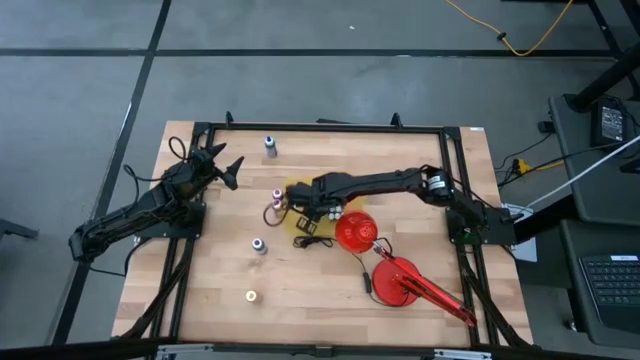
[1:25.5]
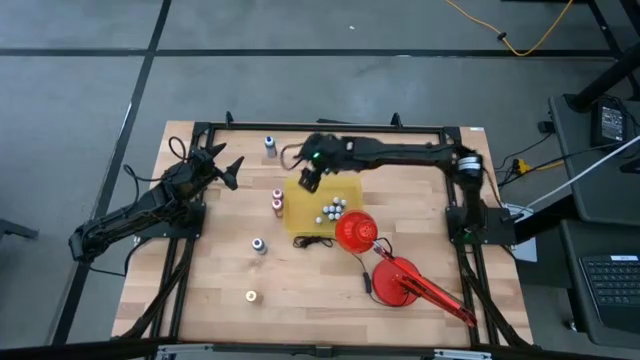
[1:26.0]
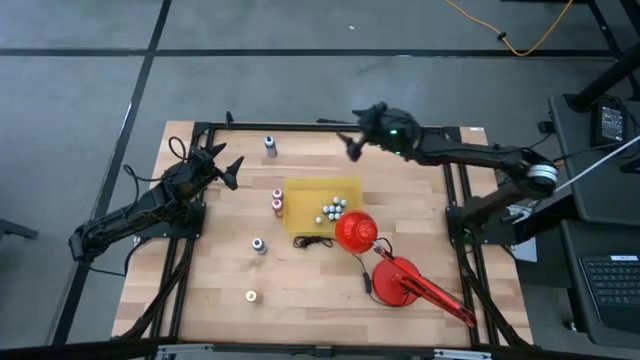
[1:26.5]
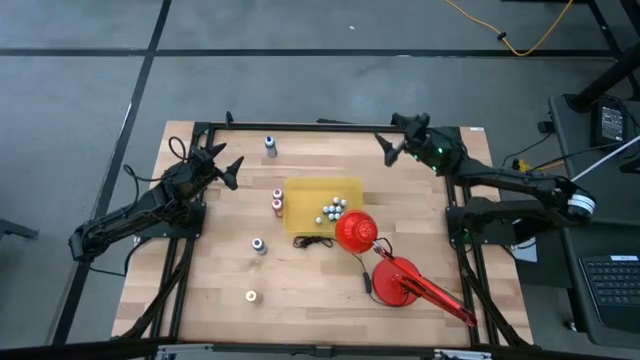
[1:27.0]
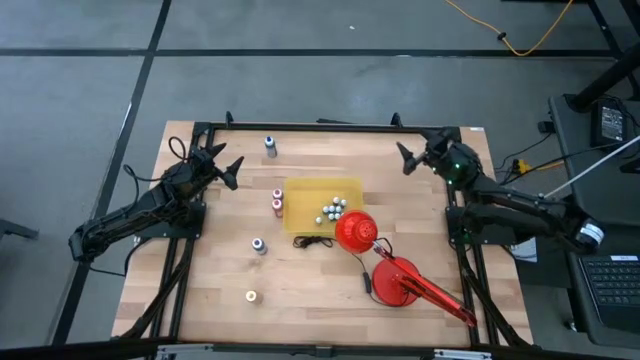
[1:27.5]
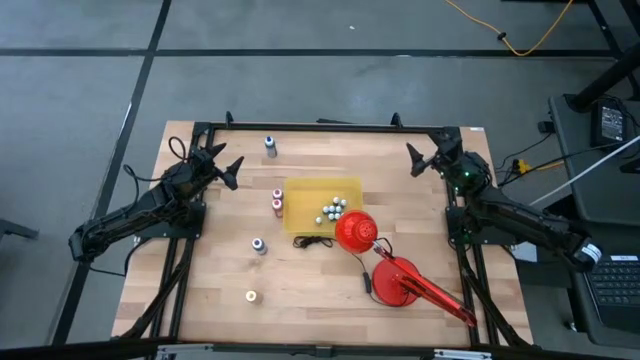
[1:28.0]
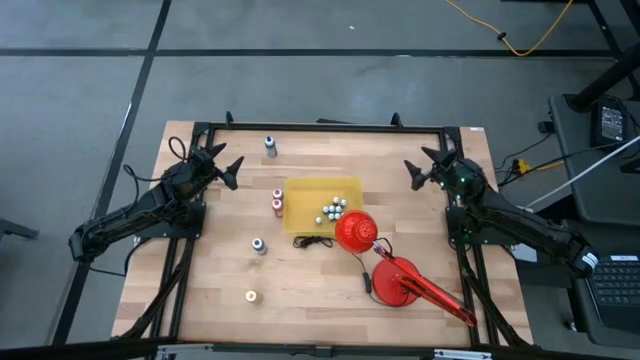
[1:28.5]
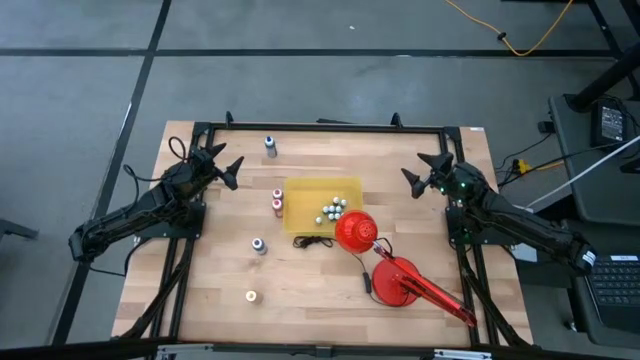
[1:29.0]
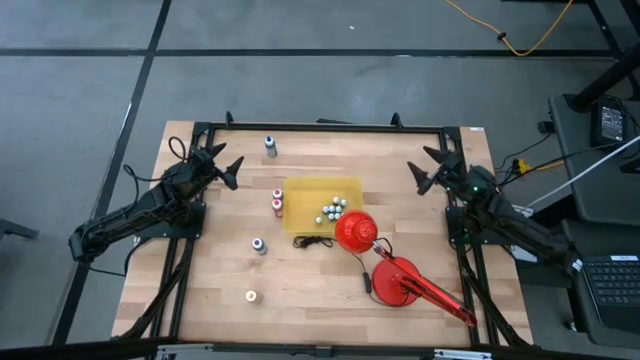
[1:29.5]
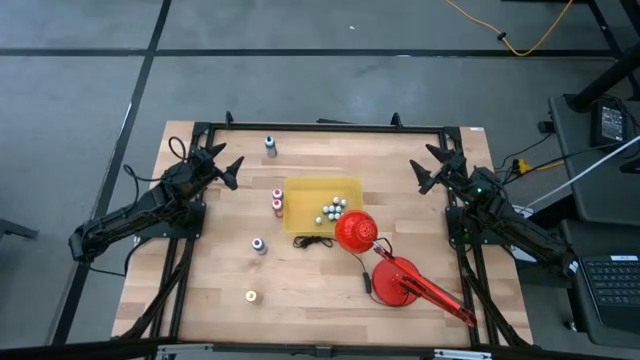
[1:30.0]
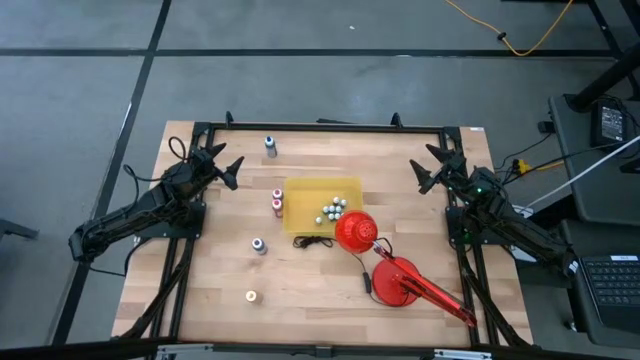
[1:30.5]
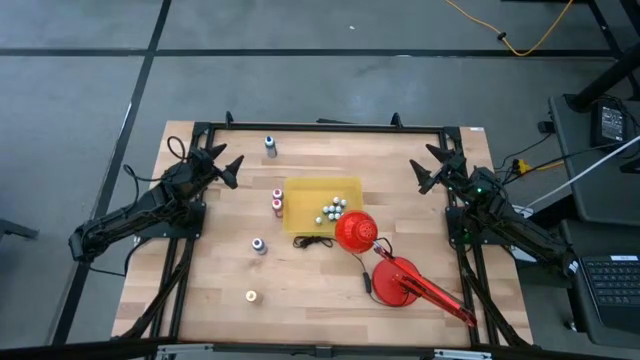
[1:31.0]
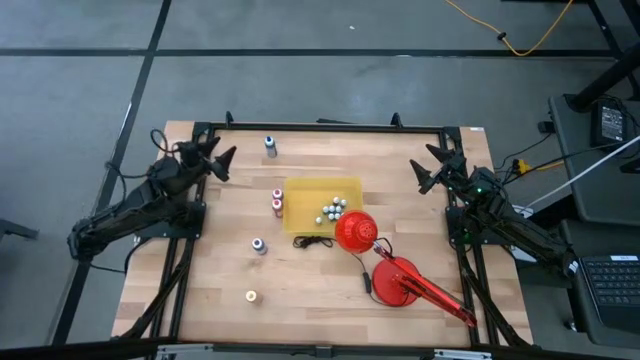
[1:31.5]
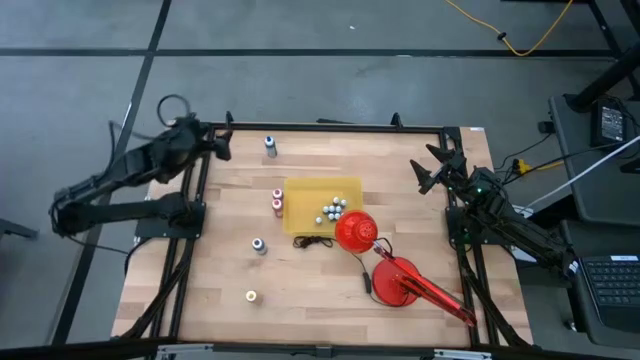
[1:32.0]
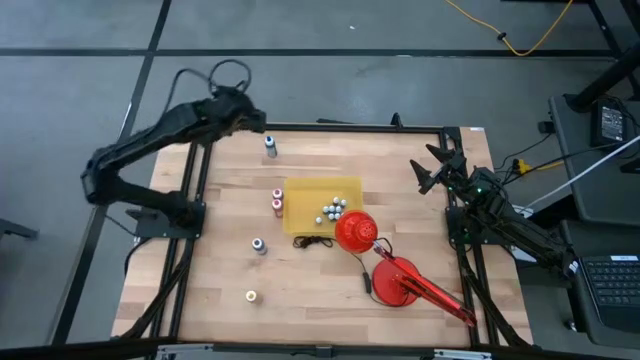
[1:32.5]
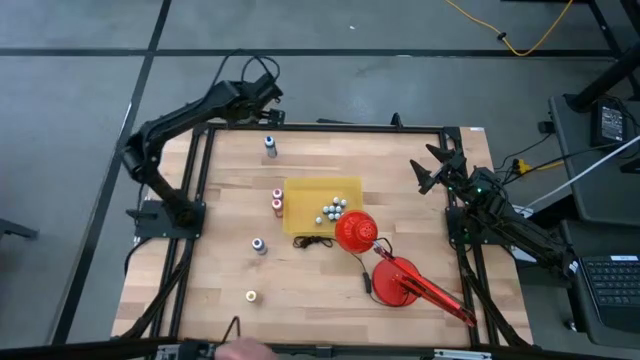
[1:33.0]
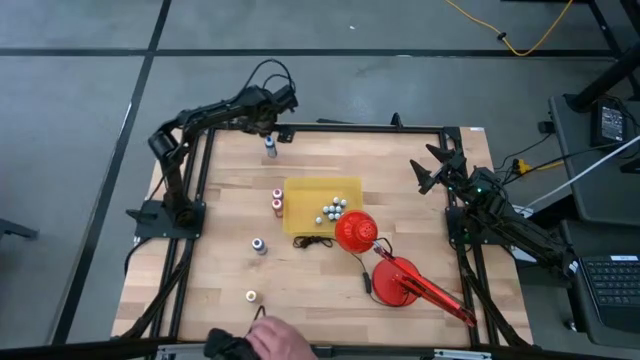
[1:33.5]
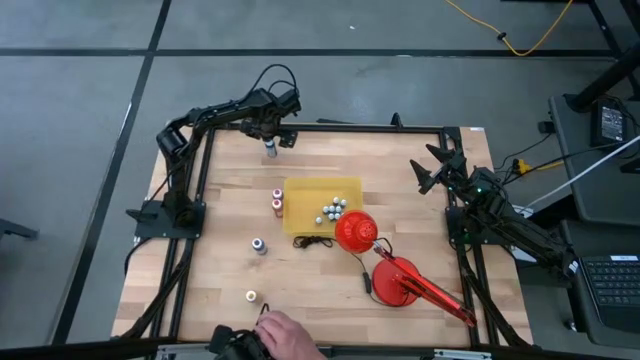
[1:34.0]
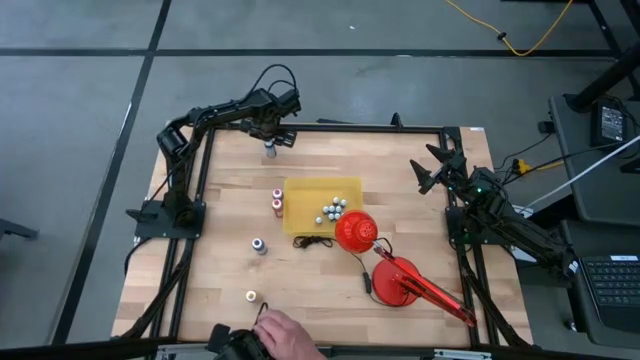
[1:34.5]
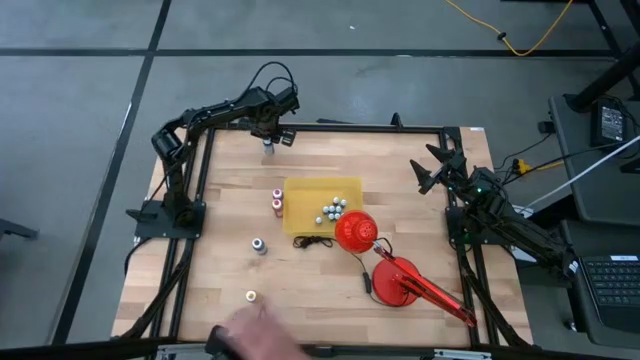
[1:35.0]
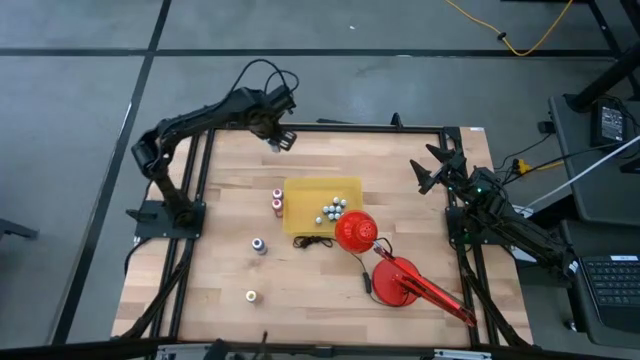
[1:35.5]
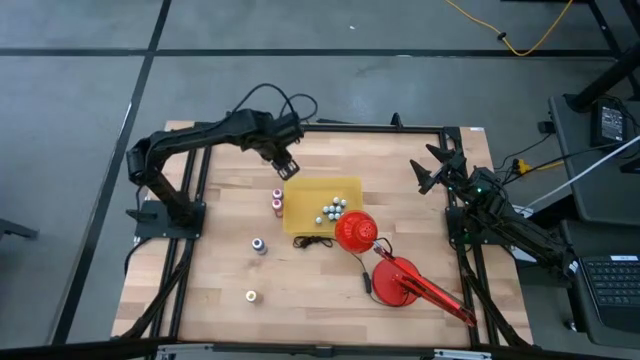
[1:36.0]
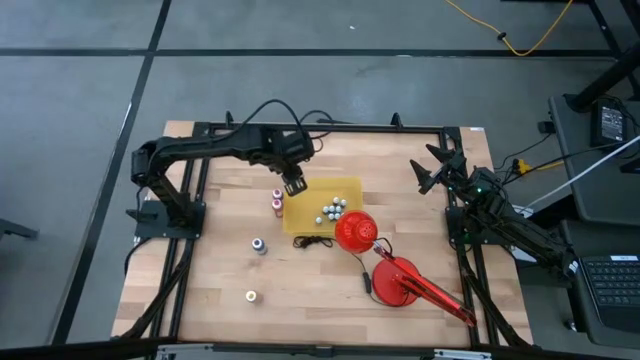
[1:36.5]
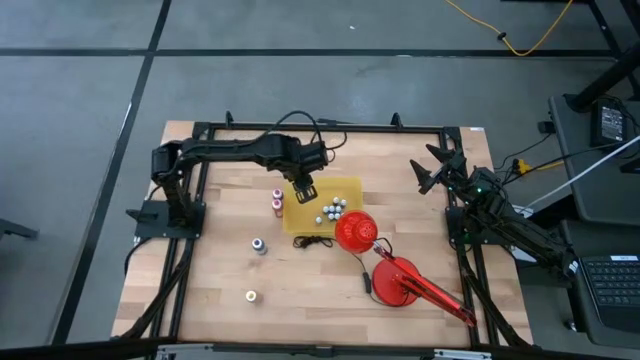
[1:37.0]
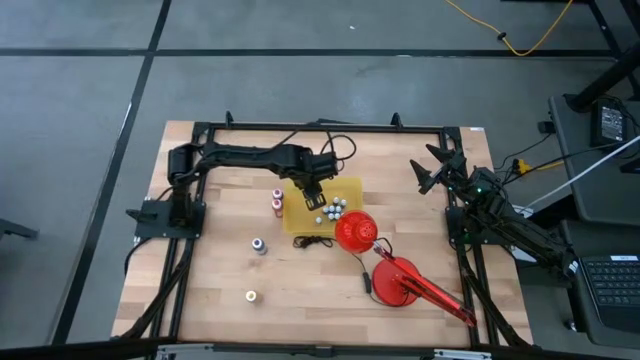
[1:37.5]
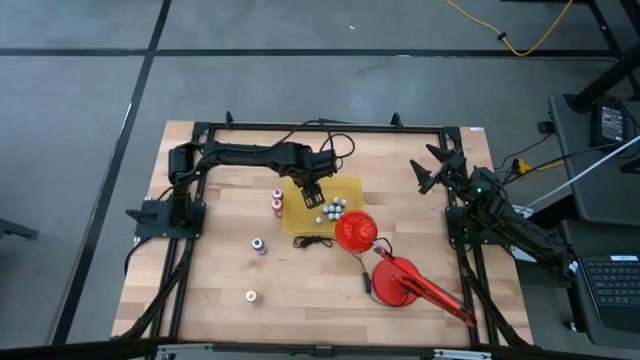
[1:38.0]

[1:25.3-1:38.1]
Task: Pick & Place food coloring
Put the large blue food coloring bottle into the yellow container

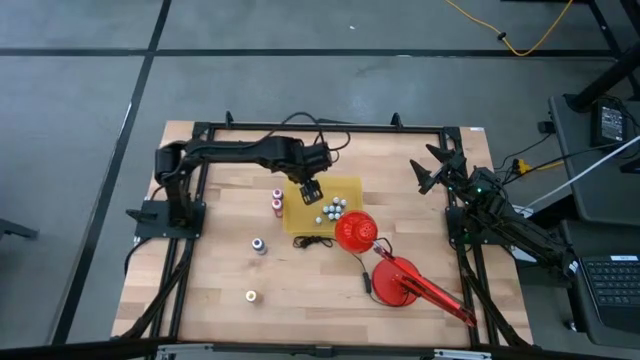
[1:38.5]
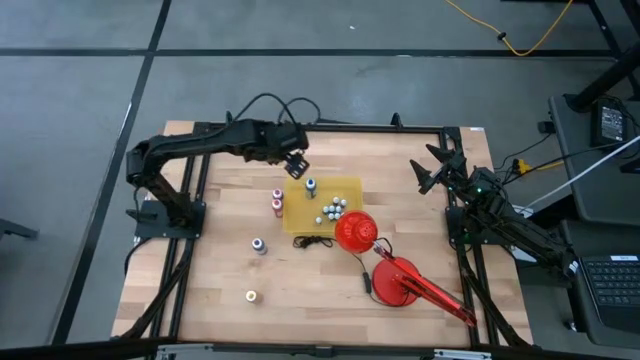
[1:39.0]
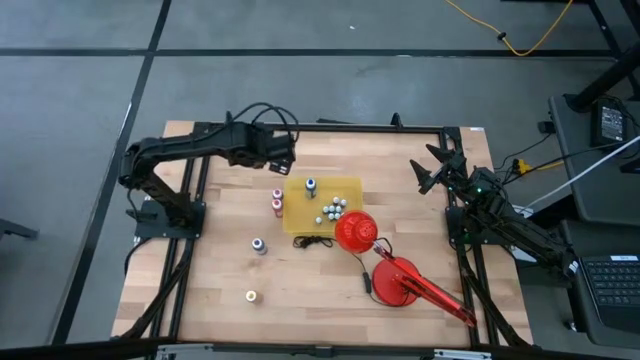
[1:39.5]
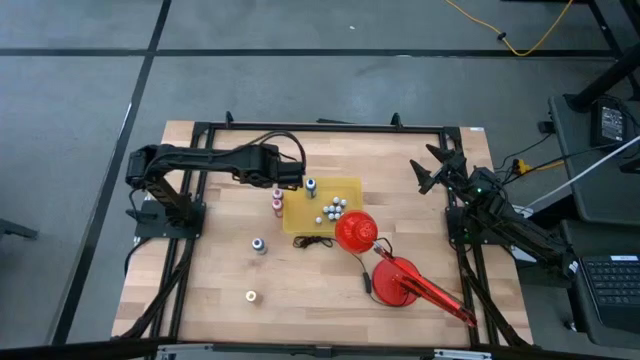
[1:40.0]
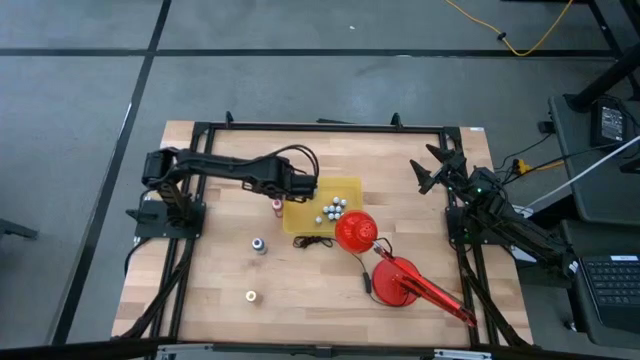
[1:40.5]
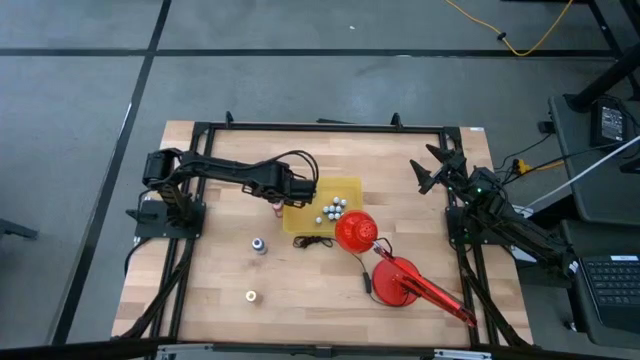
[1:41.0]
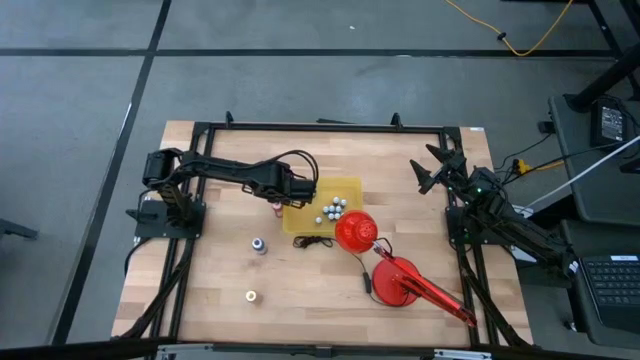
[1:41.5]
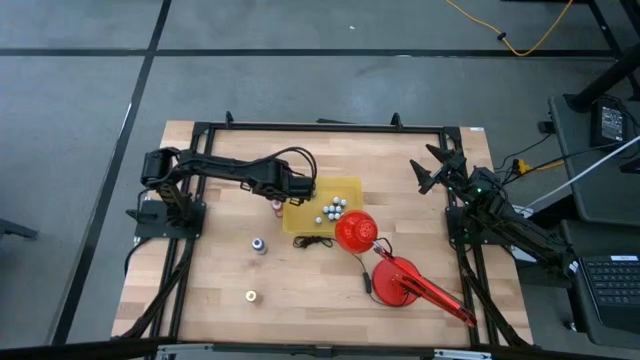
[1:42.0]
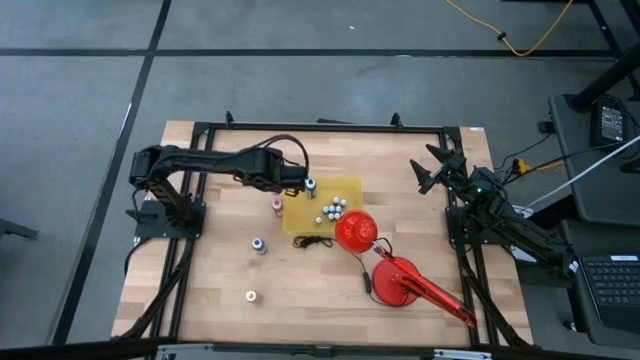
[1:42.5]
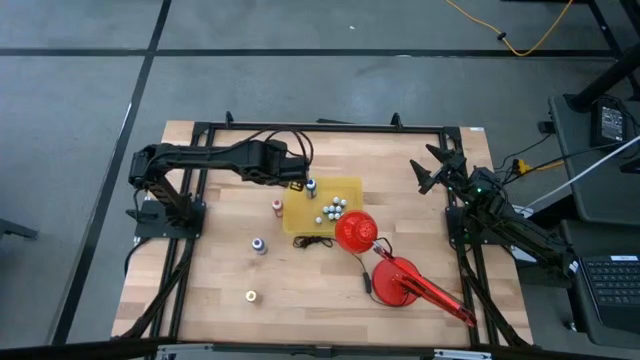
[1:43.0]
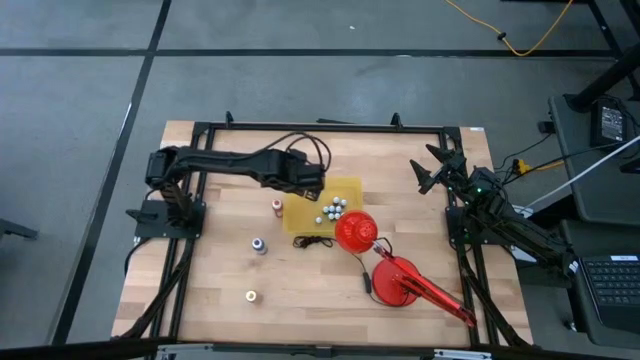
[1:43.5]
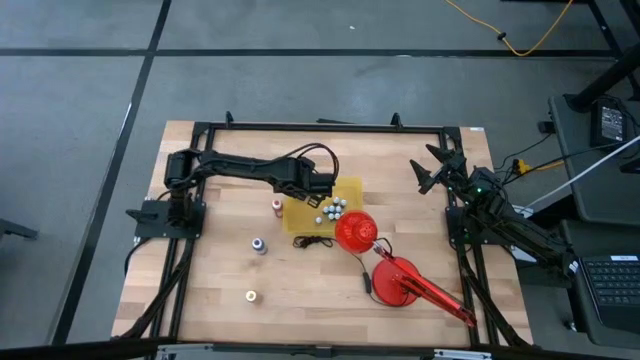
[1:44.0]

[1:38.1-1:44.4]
Put the large pink food coloring bottle into the yellow container

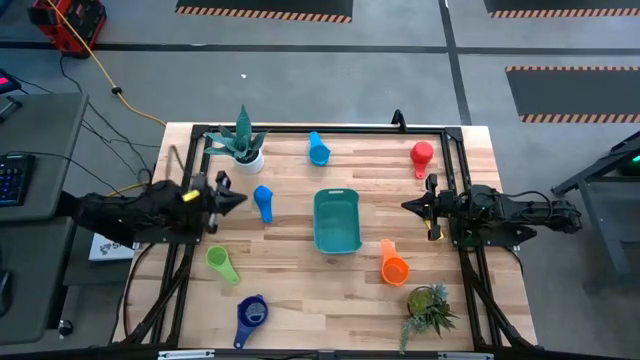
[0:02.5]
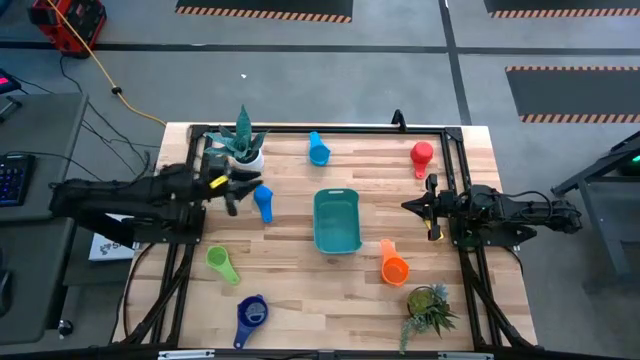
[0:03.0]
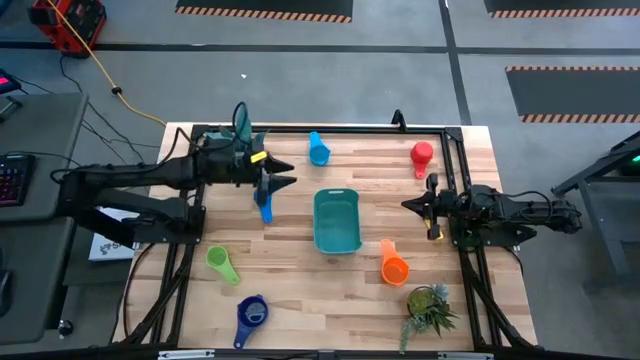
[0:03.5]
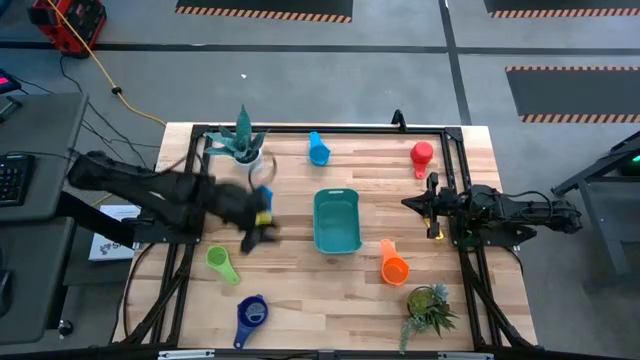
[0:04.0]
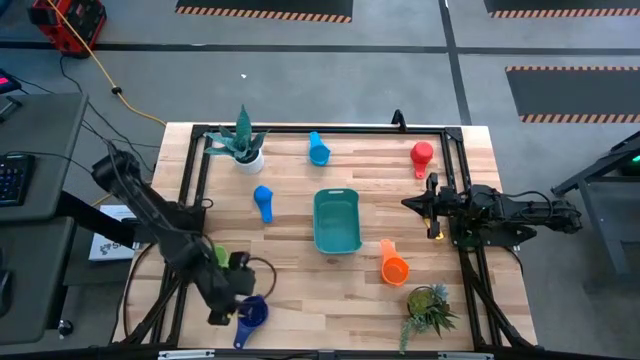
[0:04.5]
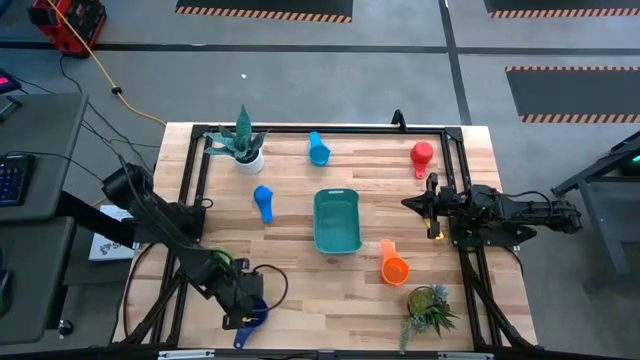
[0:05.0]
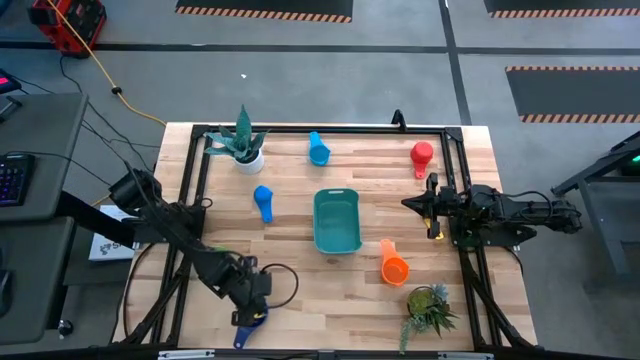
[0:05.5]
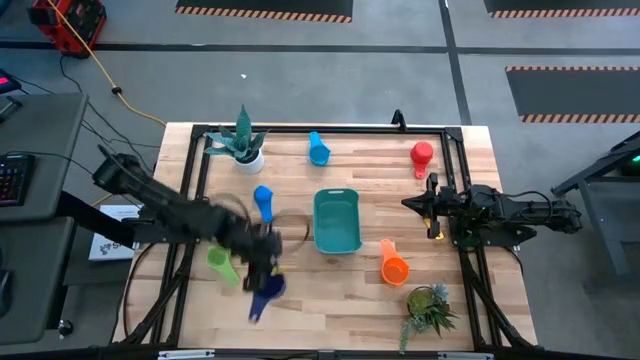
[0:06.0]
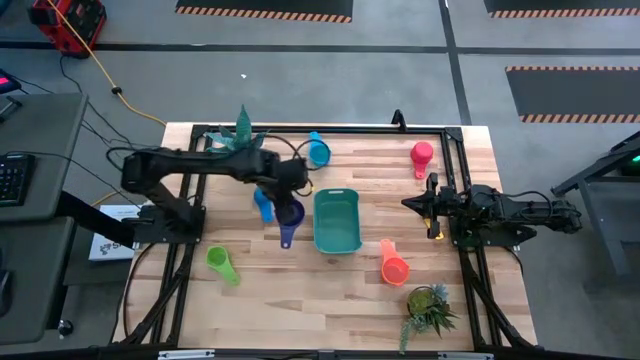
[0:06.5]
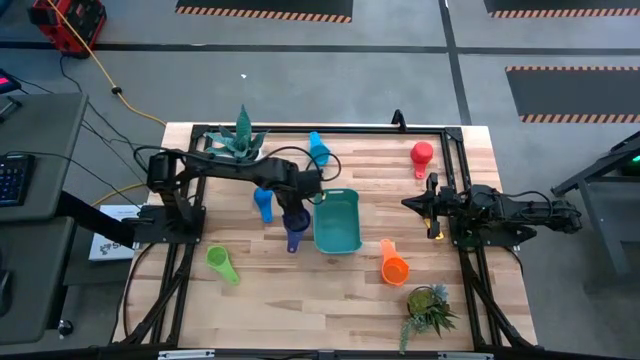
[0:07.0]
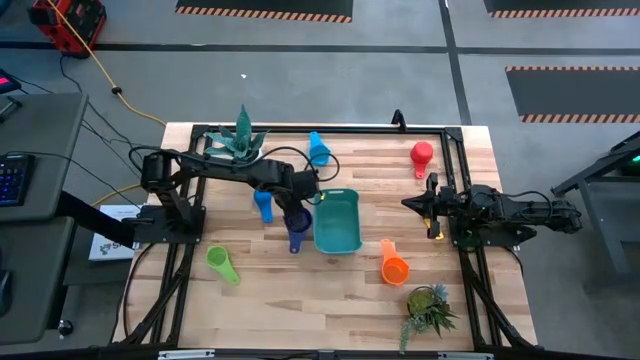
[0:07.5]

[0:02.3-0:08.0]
Task: Nest measuring cups in basket
Move the dark blue measuring cup to the center of the table
